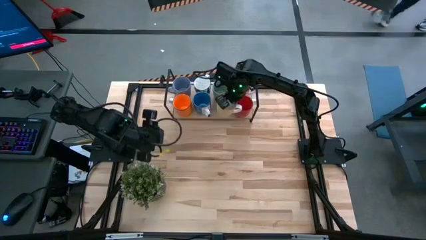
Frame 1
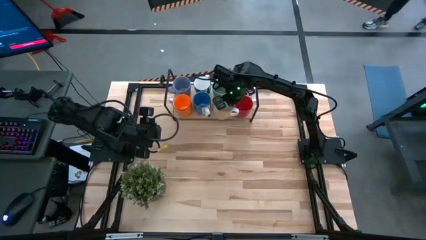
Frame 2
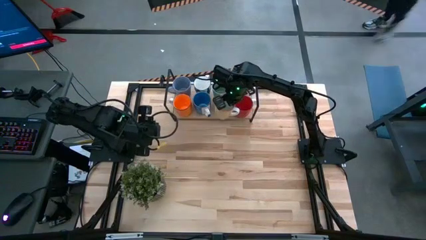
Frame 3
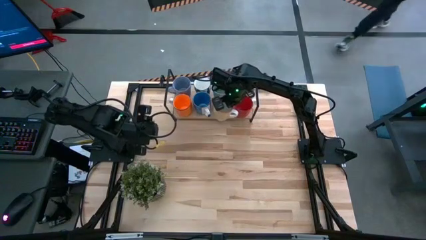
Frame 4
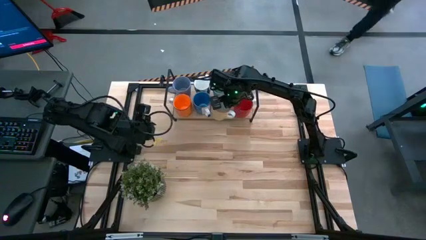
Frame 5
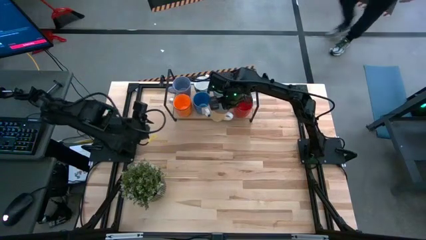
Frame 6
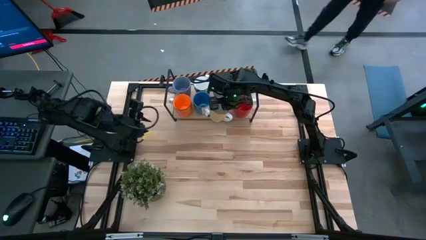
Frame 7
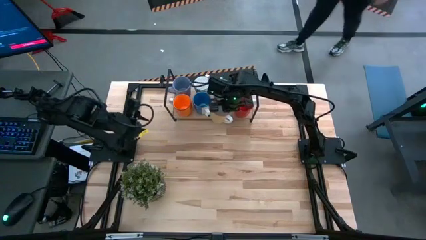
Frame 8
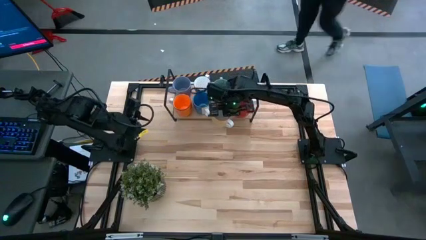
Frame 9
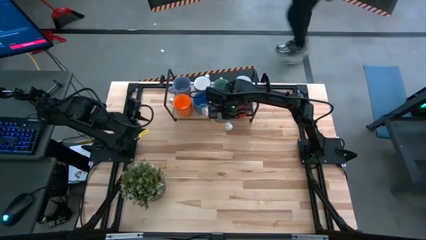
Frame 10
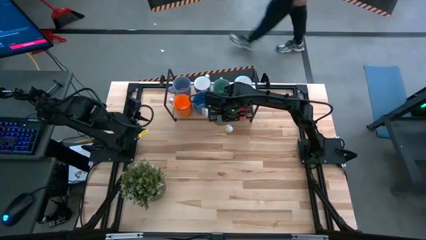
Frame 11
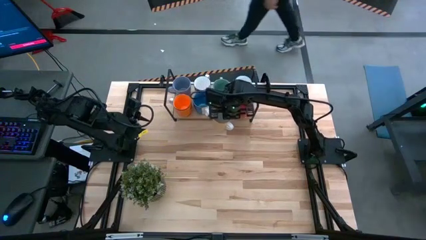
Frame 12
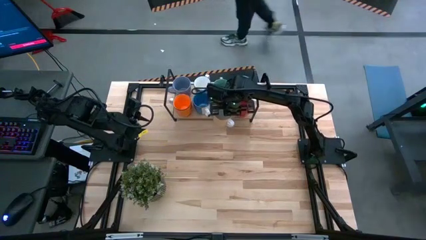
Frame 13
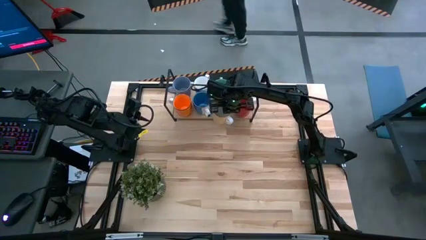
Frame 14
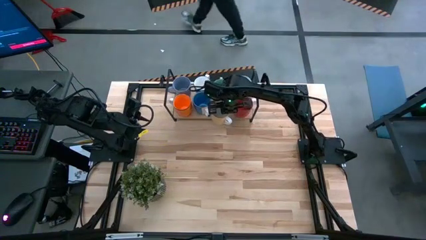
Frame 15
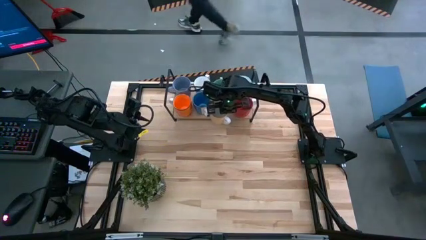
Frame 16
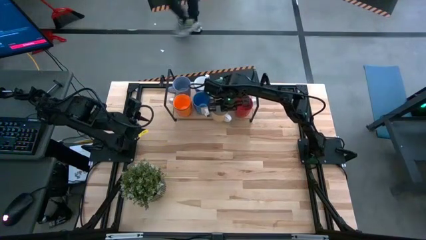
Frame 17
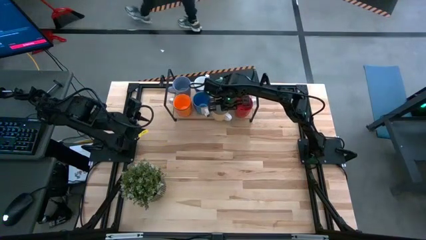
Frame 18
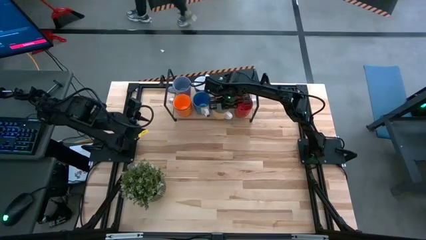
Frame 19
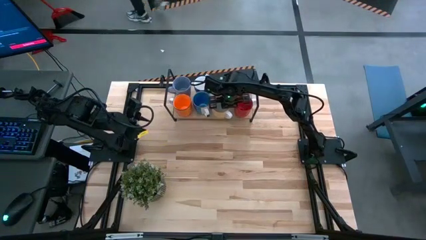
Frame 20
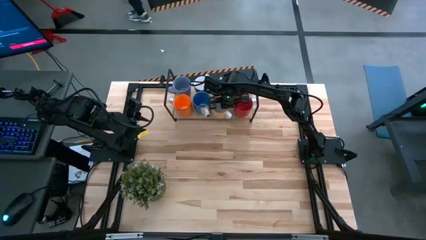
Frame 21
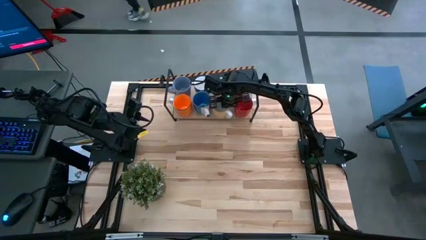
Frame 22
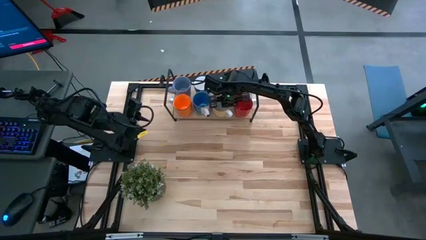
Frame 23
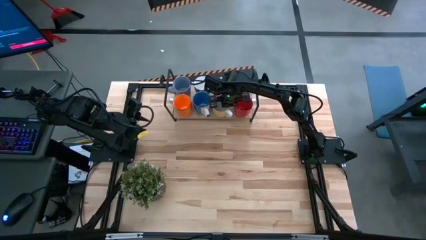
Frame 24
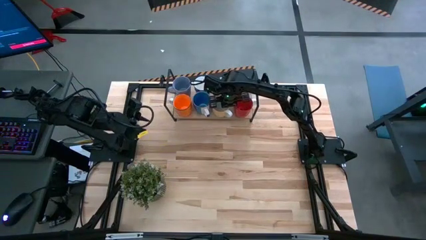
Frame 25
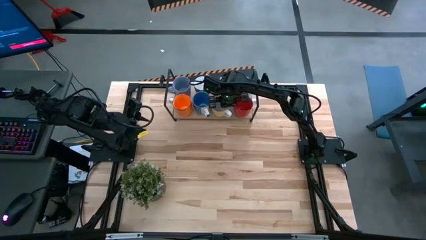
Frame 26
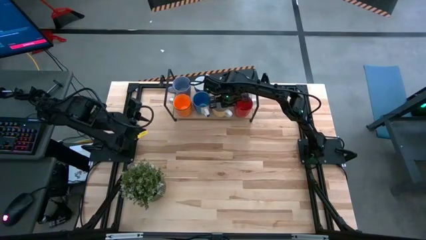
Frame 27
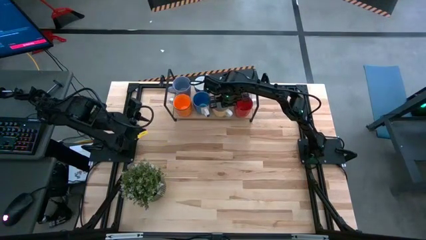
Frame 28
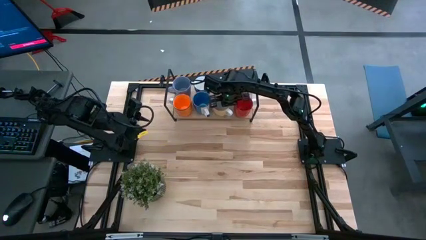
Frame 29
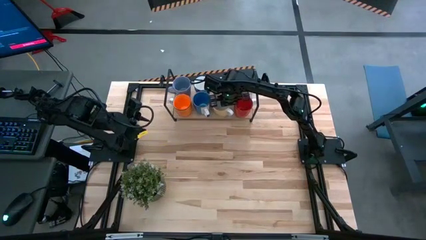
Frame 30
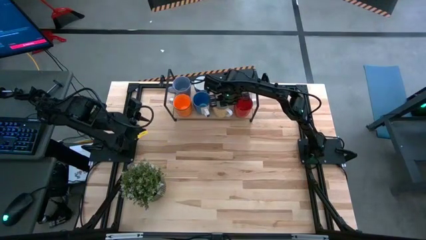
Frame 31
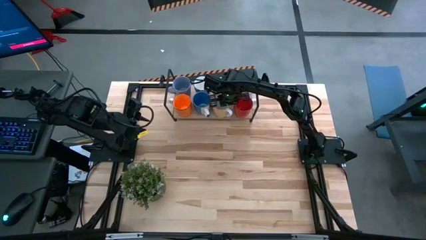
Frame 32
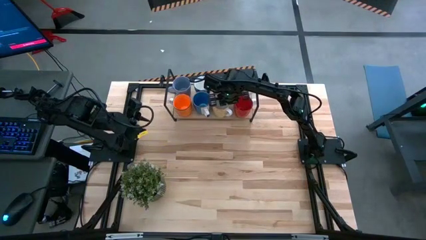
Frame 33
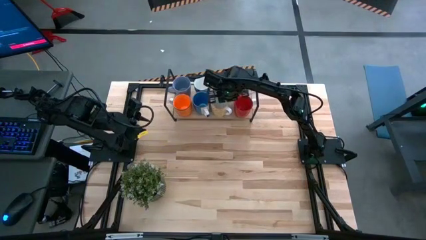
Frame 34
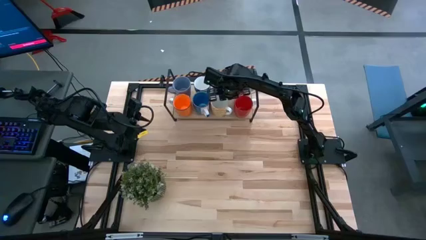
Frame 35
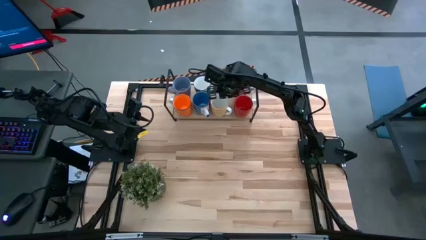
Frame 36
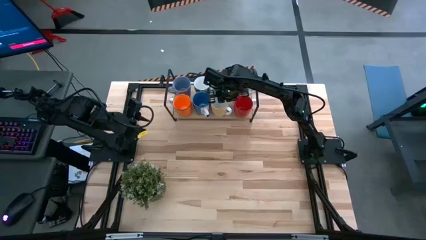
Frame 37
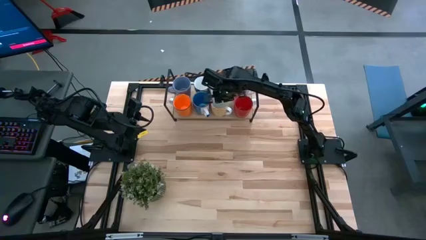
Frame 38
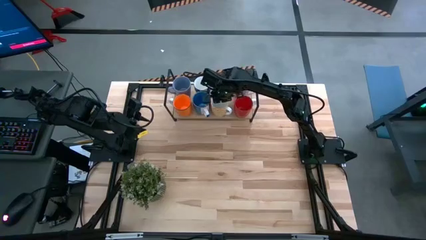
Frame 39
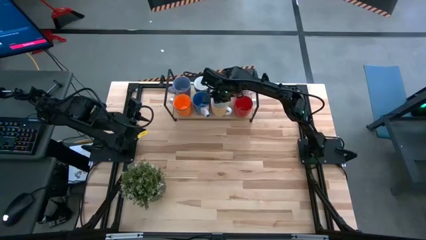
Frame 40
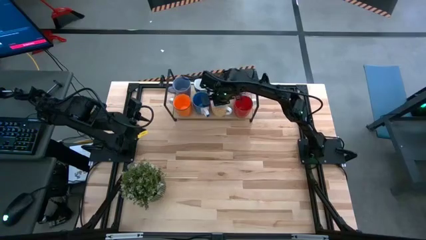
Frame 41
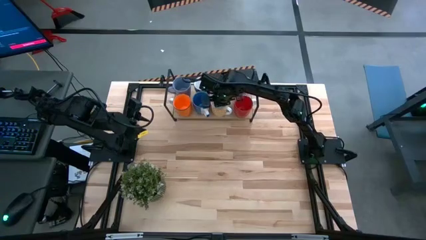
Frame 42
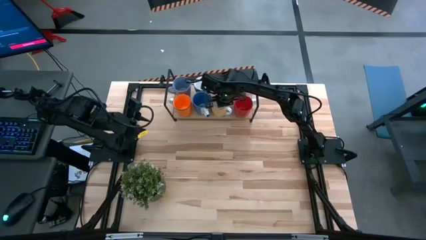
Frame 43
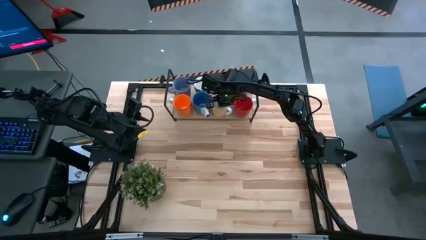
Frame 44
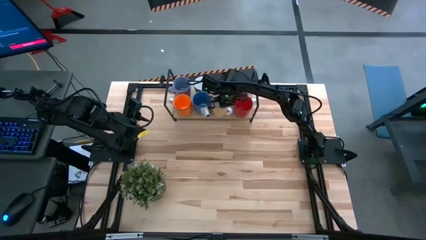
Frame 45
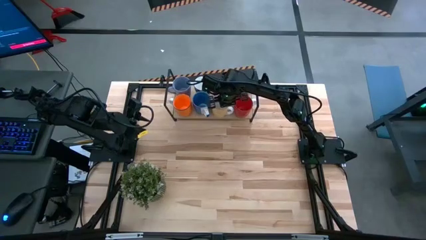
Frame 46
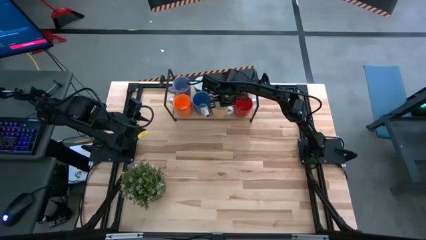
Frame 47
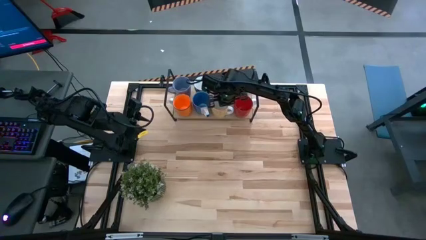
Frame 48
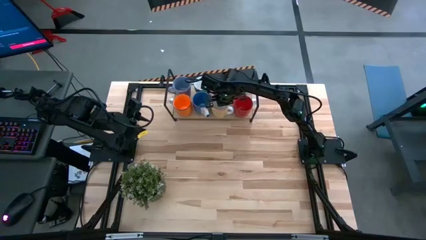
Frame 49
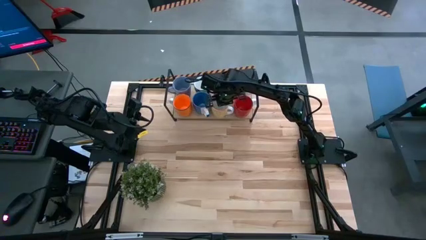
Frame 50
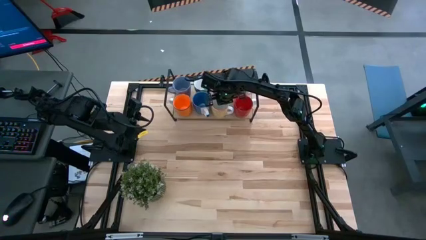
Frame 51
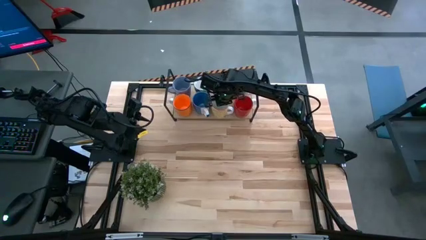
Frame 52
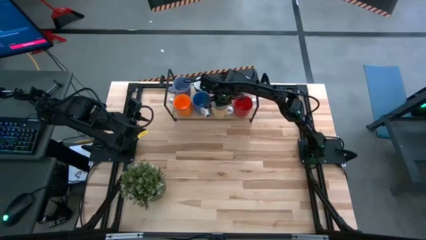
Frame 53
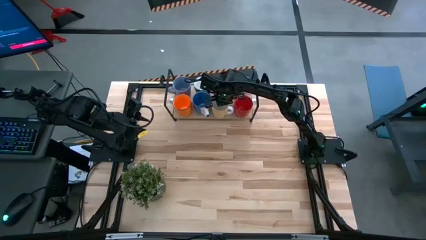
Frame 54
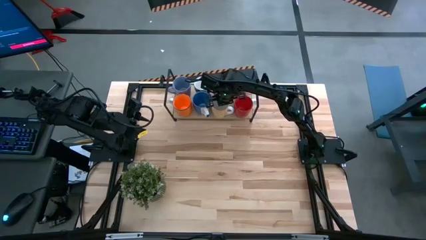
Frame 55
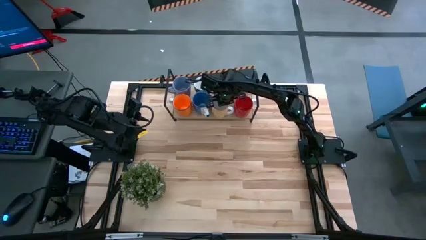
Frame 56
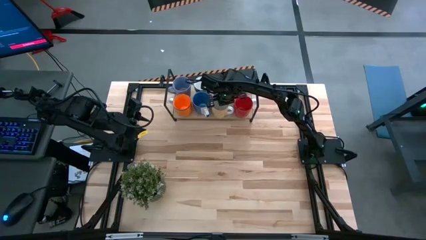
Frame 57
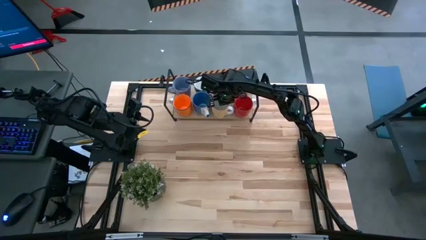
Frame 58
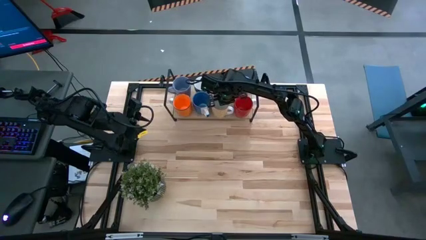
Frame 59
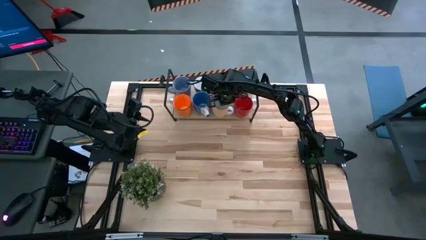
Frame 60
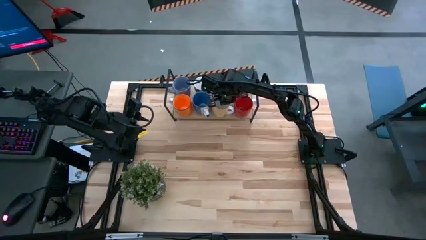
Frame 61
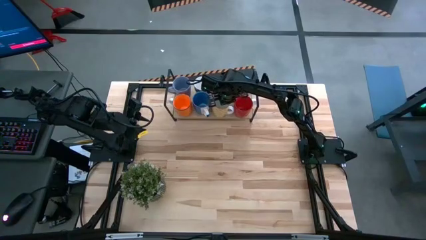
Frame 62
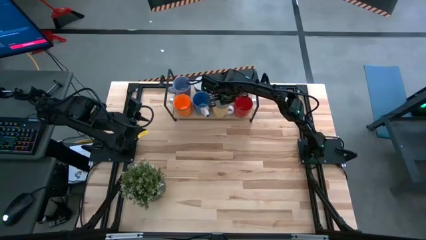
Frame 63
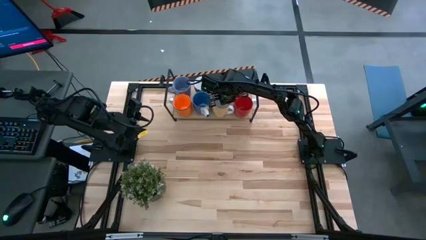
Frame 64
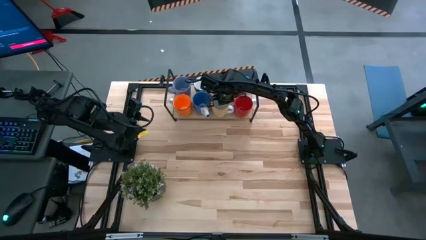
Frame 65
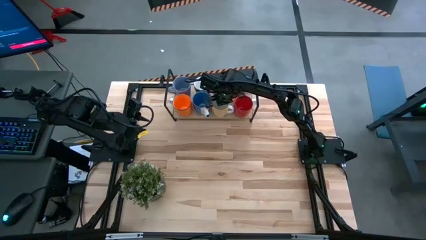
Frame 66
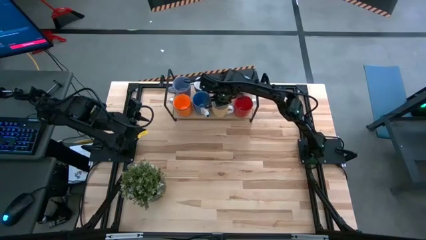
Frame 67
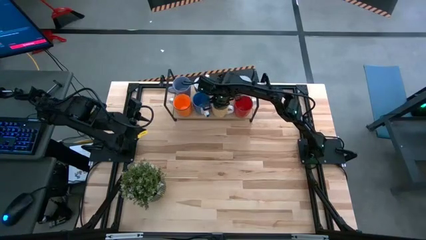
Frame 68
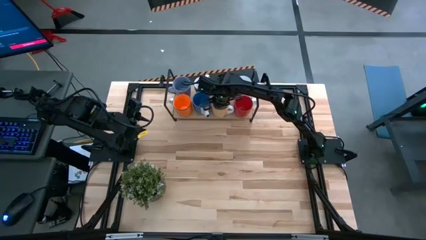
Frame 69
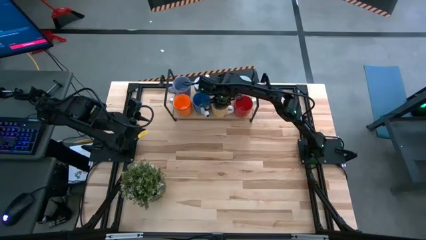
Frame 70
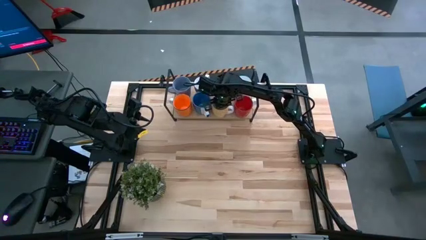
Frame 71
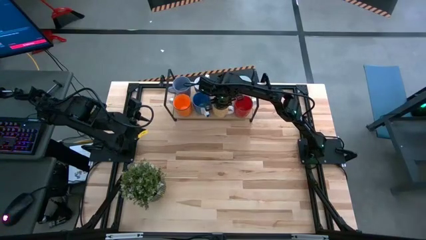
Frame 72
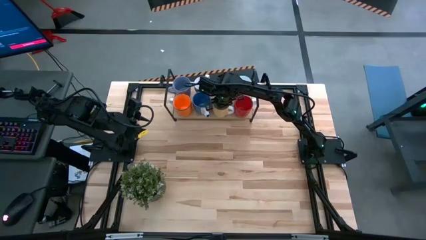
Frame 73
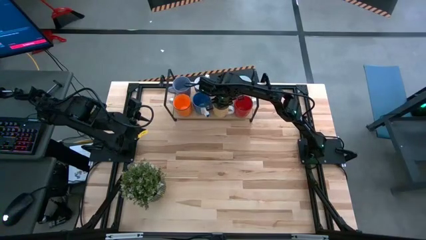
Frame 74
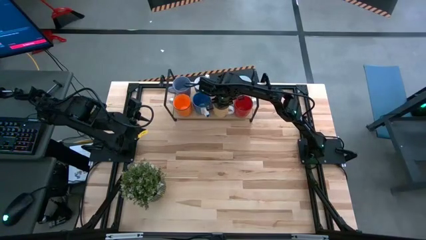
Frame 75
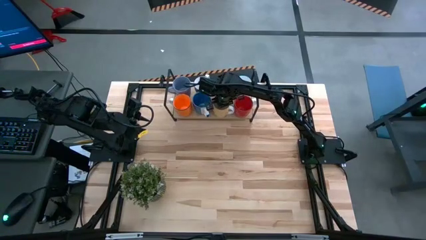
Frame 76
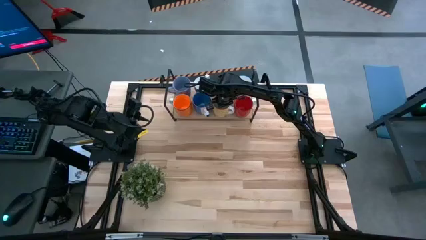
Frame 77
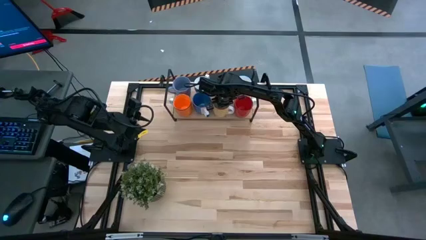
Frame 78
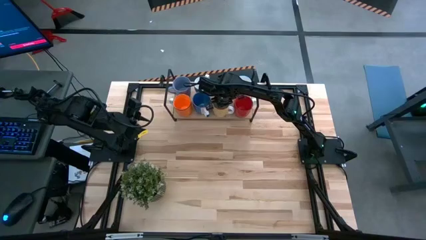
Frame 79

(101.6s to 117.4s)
Task: Place coffee mugs
Put the yellow mug on the shelf
